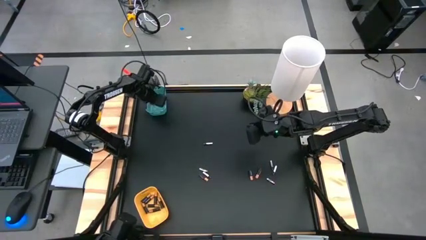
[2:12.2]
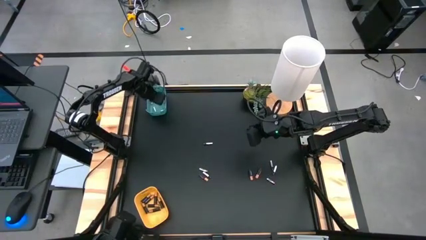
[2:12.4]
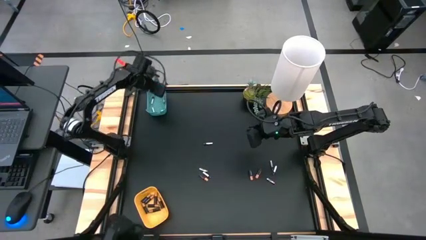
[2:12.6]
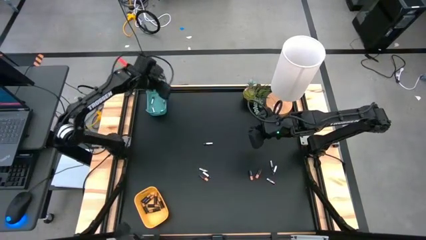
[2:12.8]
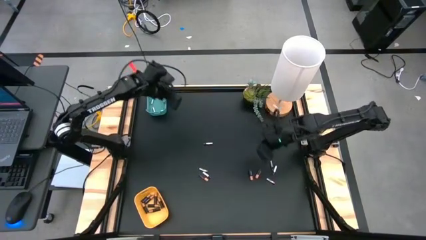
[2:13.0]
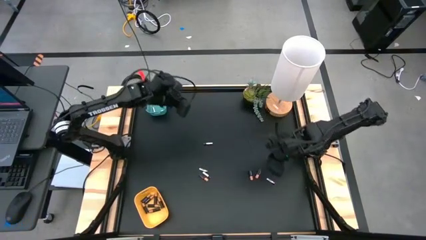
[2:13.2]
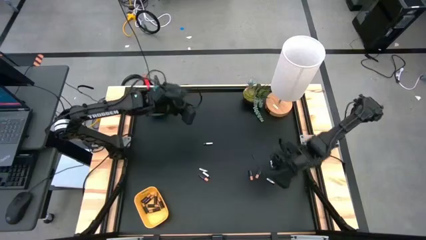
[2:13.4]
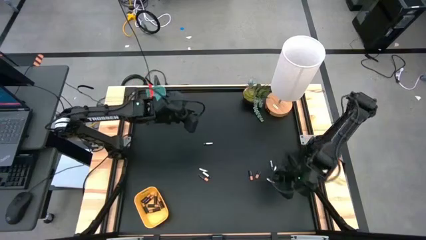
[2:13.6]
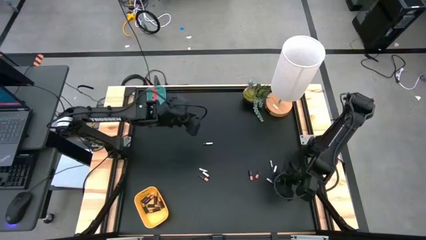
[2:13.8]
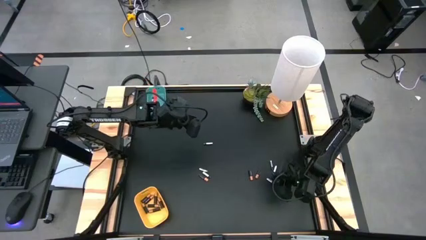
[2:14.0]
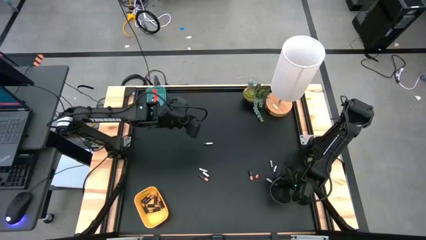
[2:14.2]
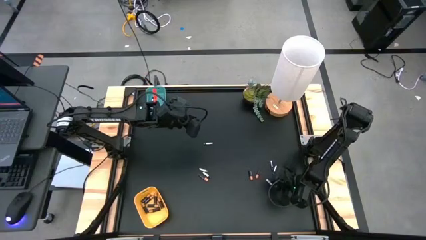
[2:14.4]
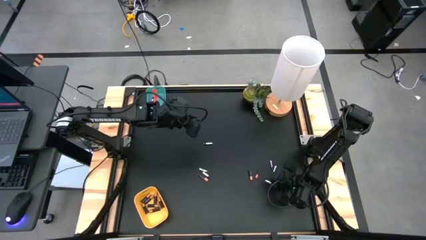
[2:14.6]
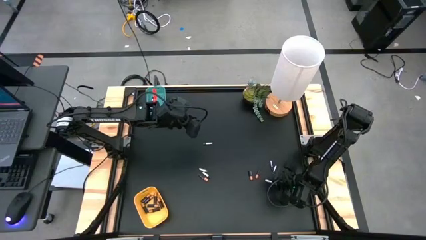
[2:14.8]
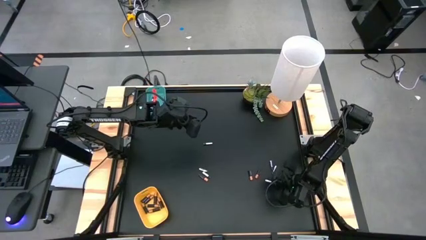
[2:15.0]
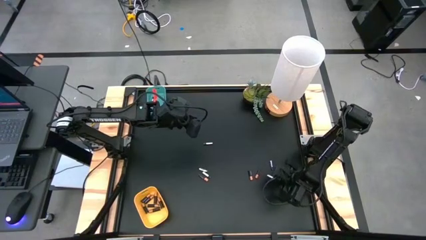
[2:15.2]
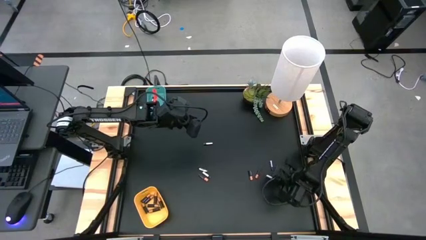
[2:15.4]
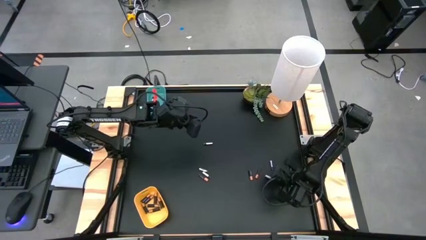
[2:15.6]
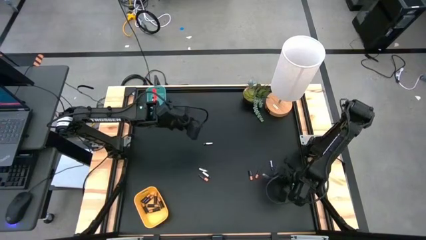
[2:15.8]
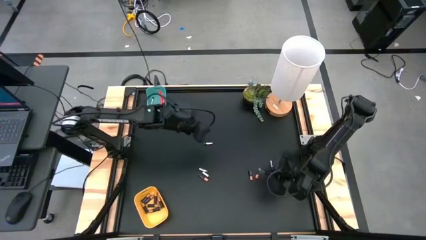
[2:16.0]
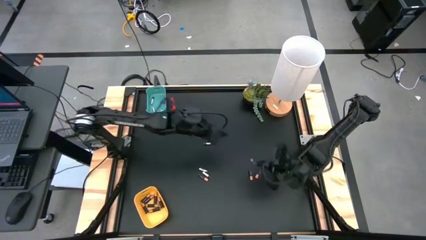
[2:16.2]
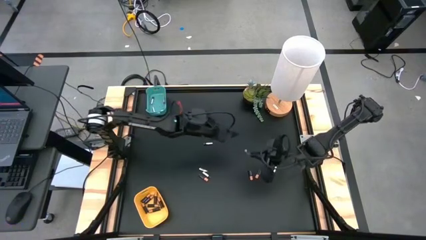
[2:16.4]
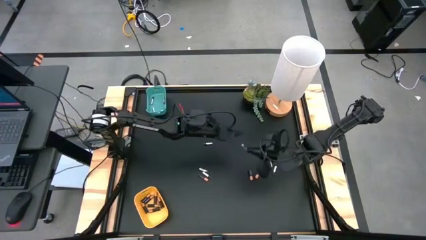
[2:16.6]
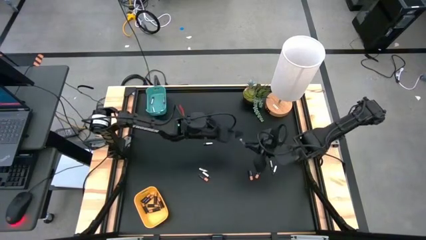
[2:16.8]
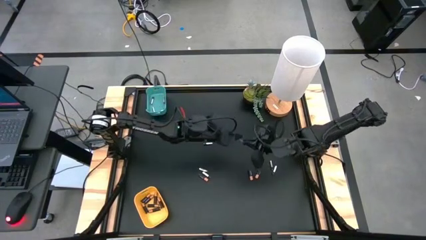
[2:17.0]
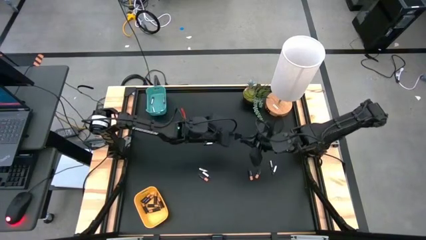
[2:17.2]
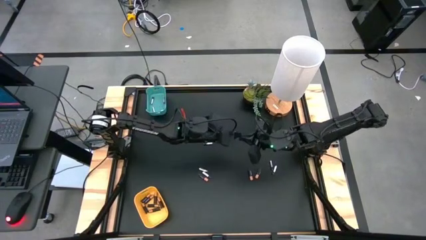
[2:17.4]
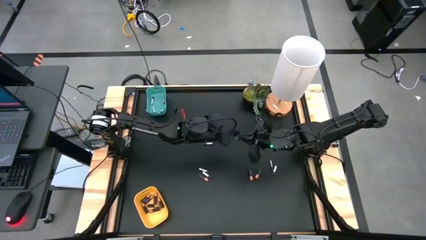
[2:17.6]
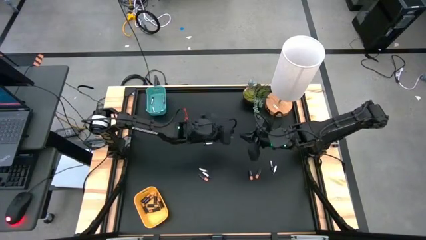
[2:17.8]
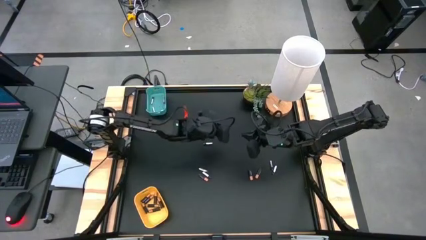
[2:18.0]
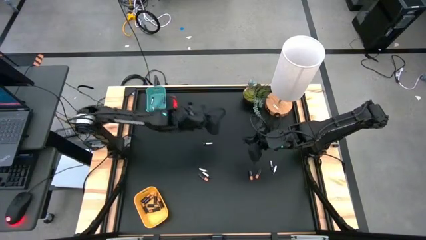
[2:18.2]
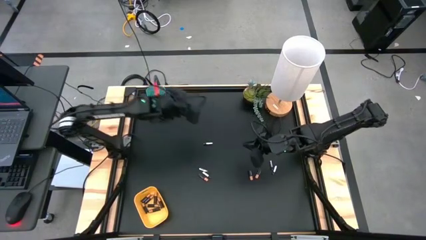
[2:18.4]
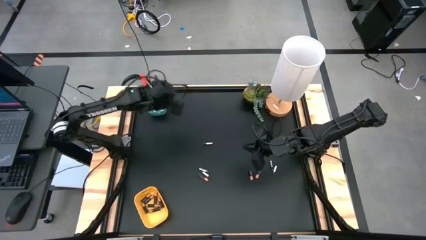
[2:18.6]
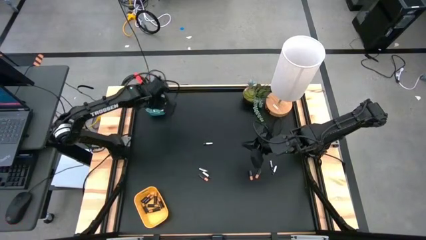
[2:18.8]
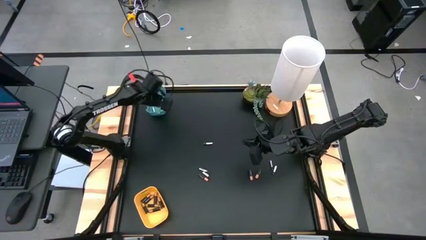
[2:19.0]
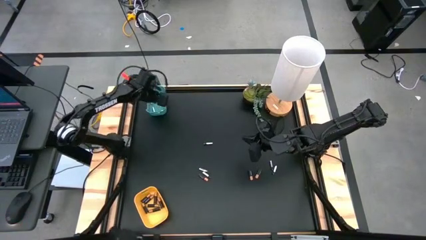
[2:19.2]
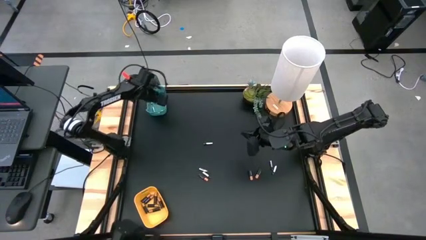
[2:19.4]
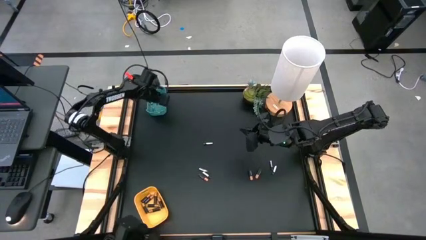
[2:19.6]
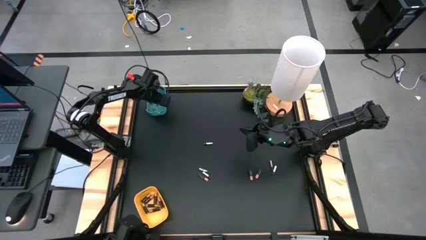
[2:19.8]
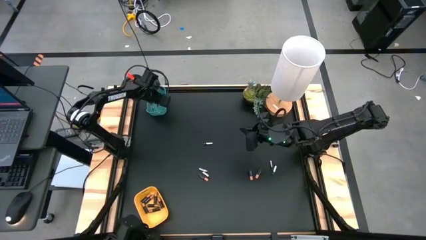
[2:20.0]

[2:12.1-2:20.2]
Task: Sort batteries
Put the silver battery into the blue bin

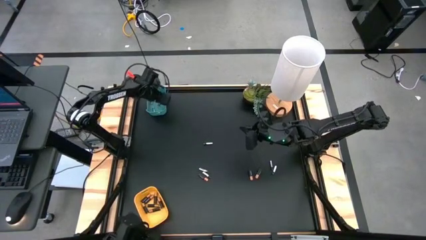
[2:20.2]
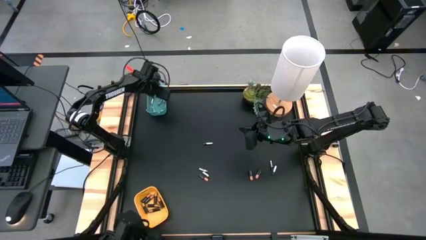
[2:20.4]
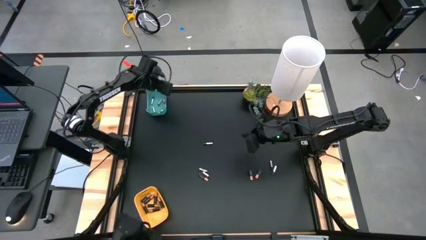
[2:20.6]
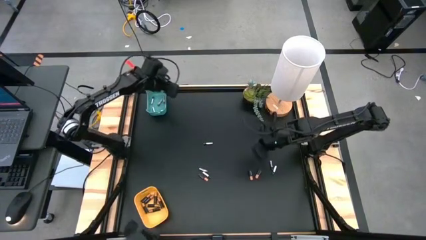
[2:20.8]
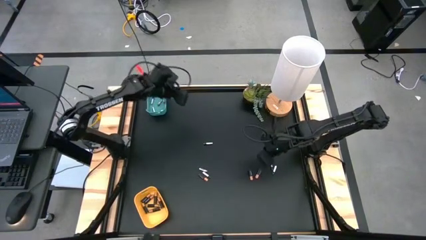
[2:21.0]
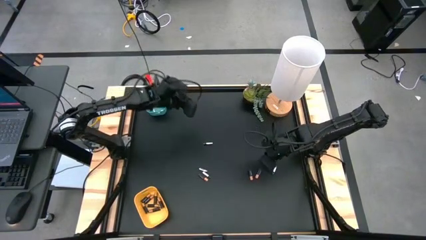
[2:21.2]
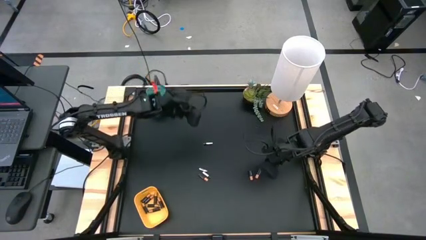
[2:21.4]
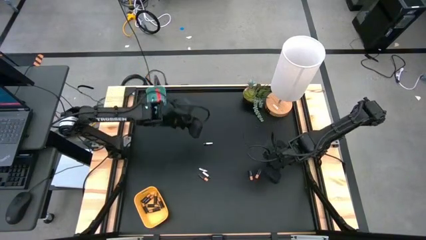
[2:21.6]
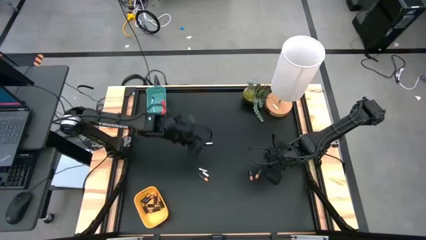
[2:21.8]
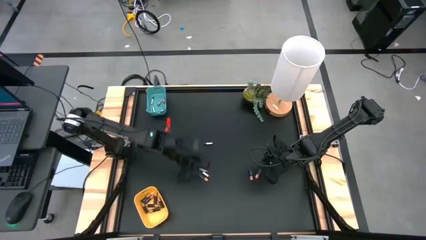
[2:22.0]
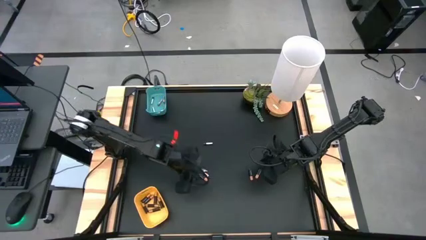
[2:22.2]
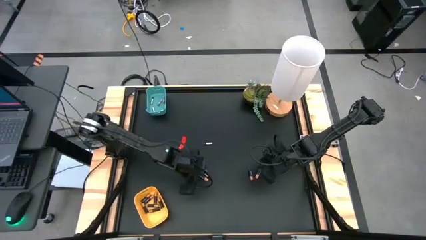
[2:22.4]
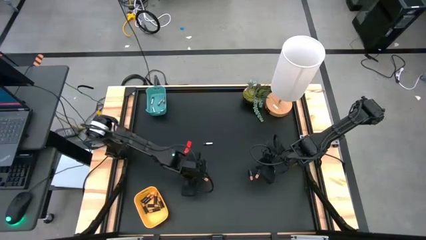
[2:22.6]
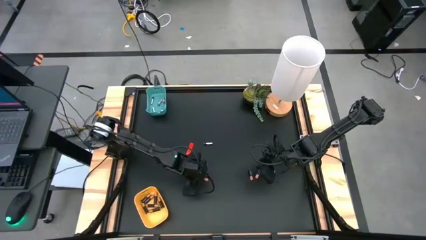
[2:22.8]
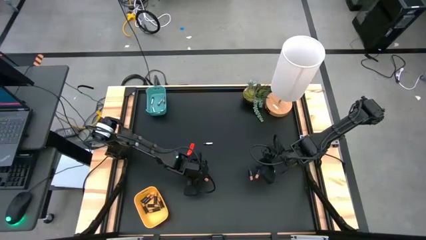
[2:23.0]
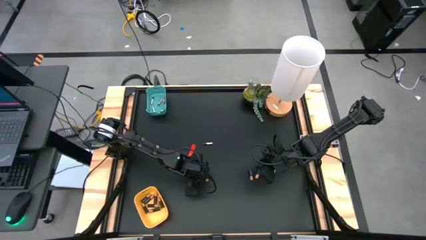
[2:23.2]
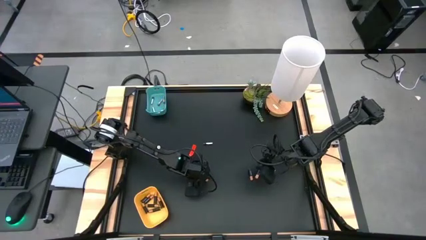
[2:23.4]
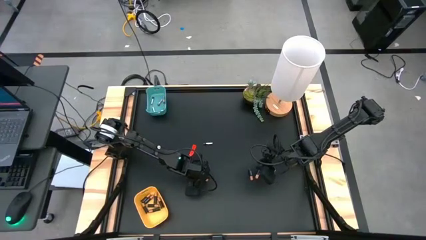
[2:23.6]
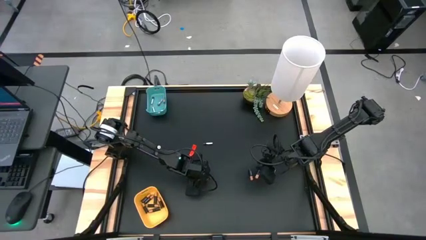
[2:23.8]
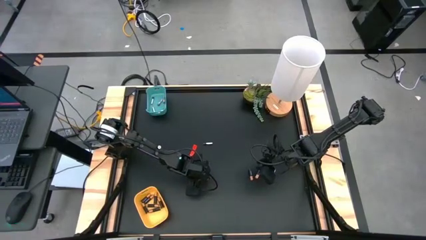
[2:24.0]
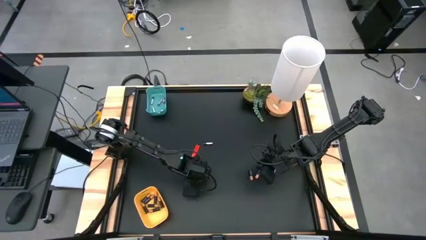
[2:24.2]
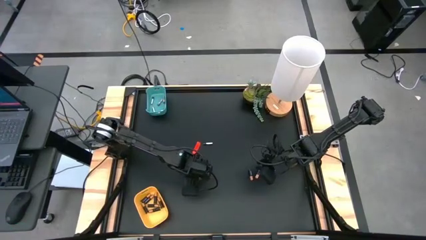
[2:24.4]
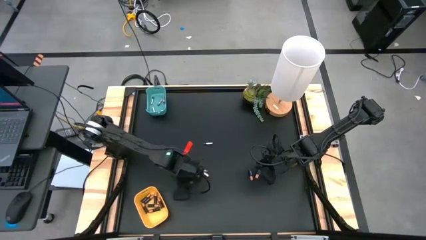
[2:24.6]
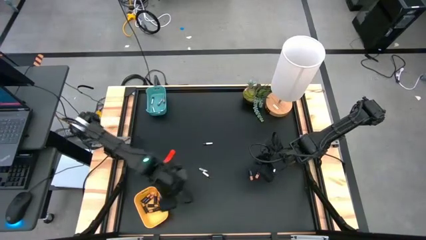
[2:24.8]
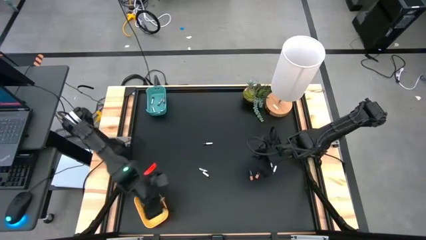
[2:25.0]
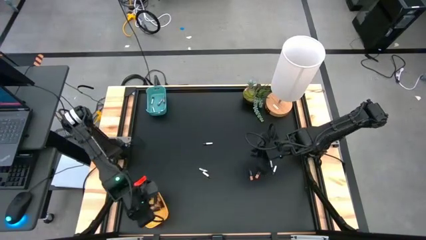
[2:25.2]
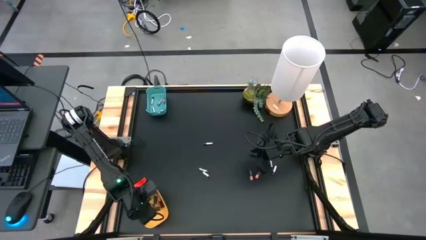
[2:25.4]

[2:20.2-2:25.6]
Put the black battery into the yellow bin

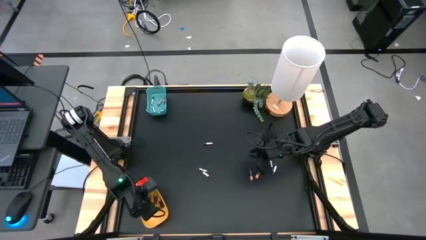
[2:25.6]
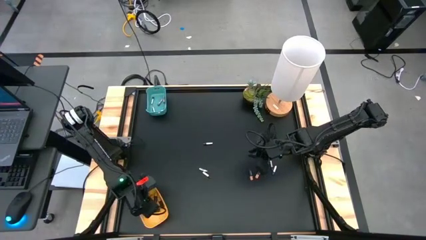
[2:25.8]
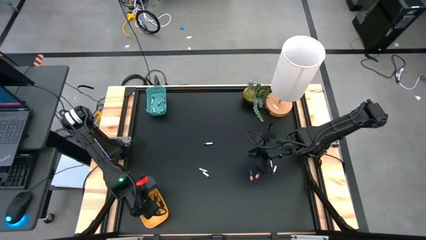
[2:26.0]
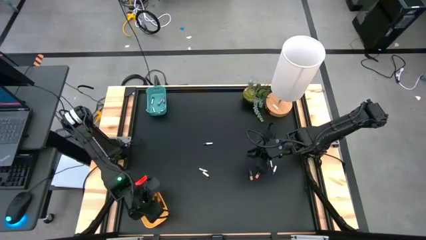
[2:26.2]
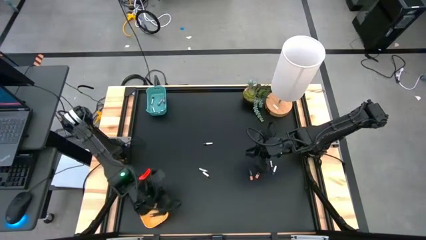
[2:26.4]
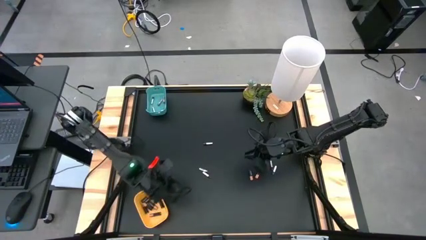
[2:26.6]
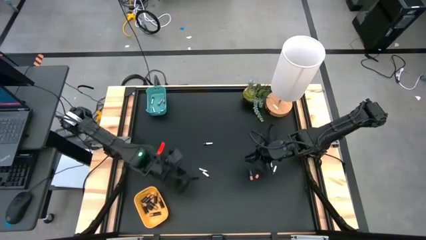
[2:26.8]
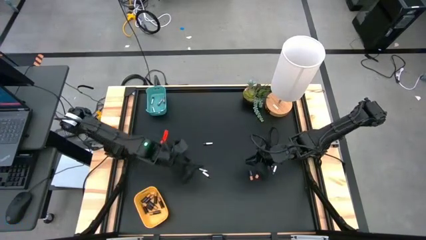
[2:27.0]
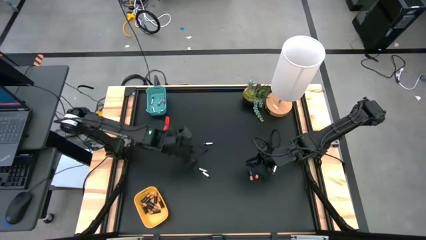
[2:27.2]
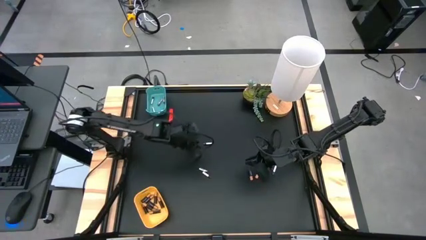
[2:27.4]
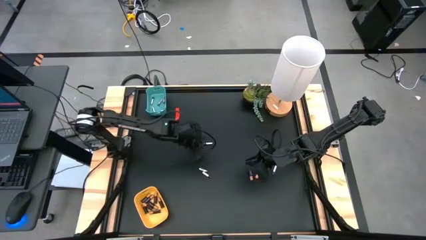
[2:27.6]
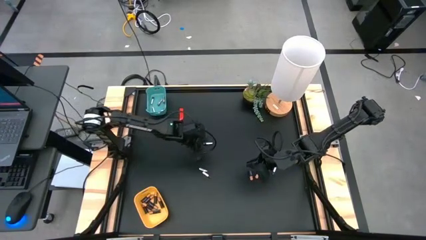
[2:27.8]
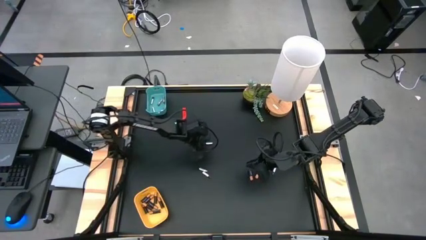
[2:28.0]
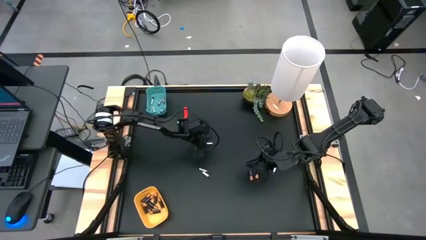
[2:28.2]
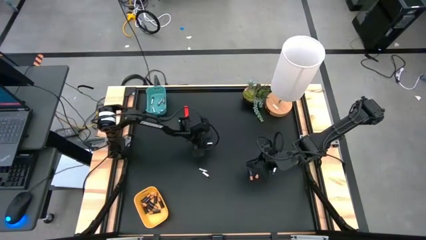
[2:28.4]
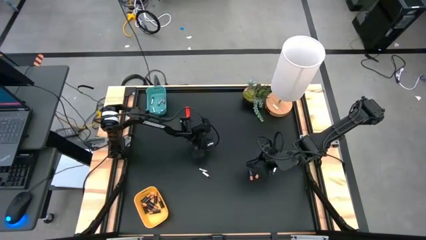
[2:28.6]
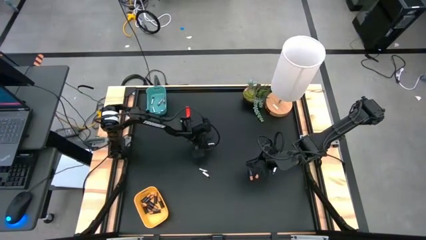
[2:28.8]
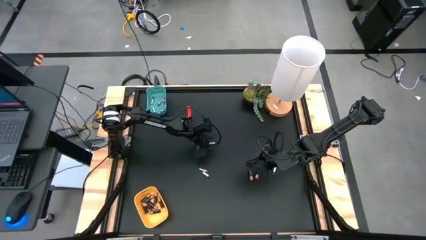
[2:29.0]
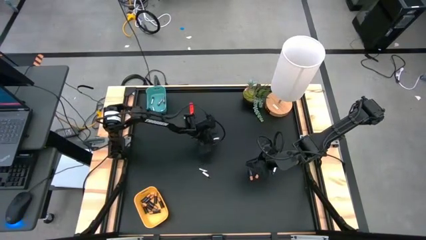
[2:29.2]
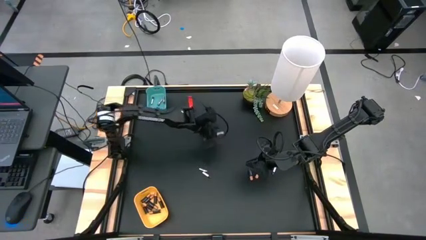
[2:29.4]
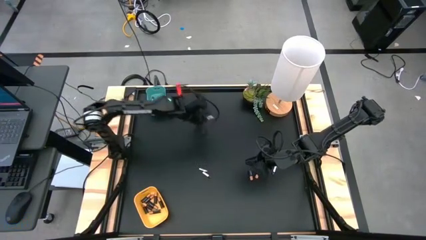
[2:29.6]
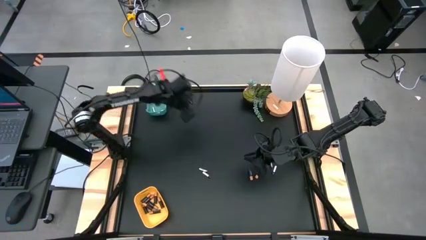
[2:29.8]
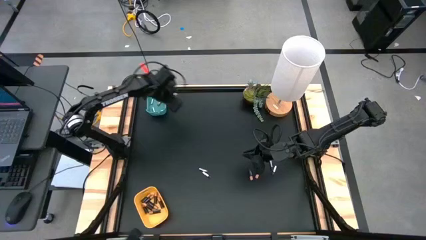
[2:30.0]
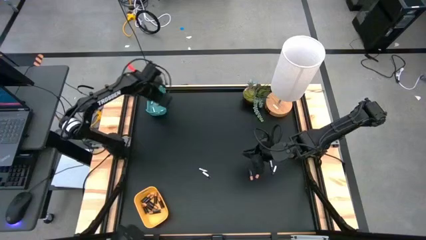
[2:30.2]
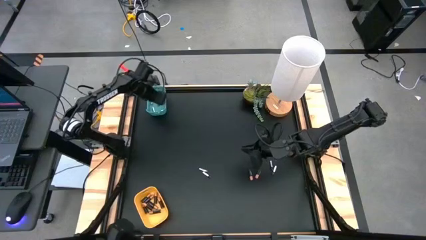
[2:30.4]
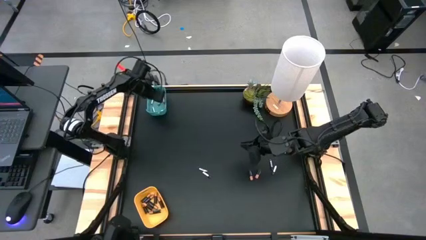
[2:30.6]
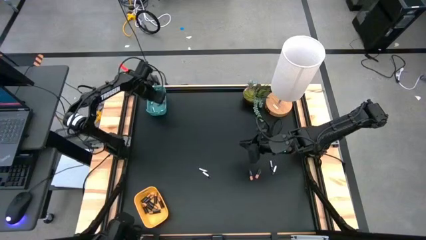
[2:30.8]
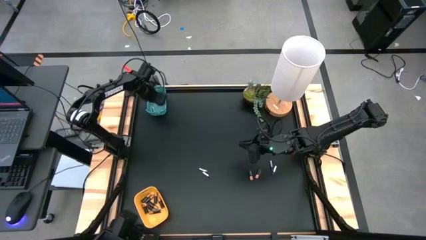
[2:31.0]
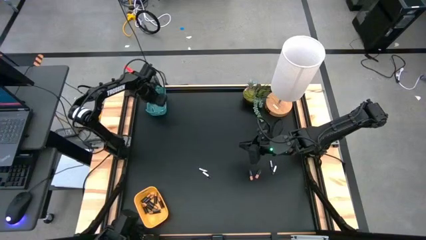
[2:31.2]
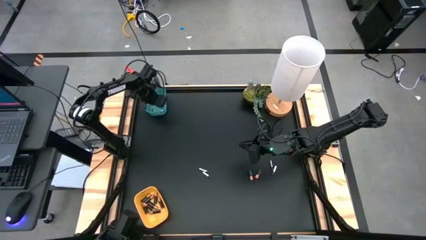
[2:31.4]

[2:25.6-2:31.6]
Put the silver battery into the blue bin
